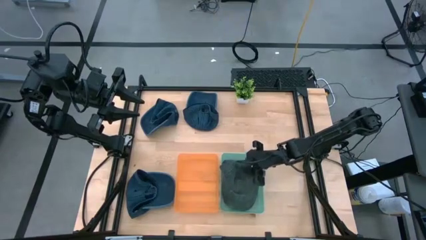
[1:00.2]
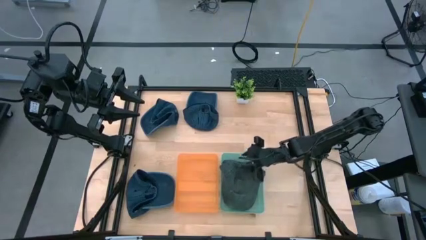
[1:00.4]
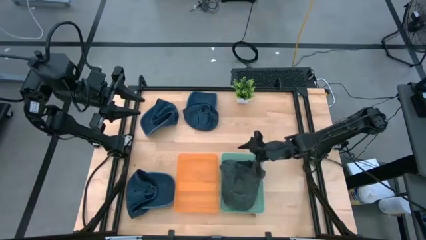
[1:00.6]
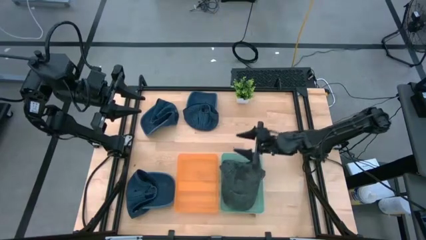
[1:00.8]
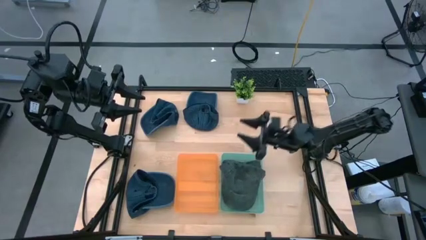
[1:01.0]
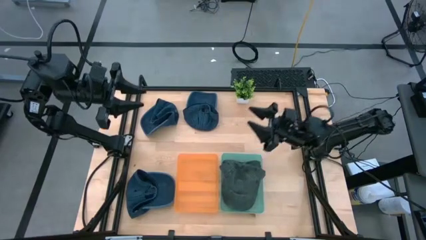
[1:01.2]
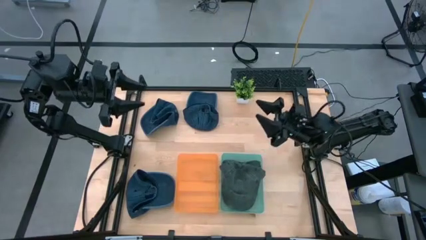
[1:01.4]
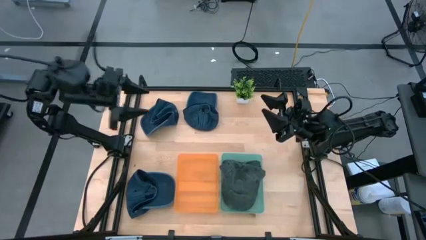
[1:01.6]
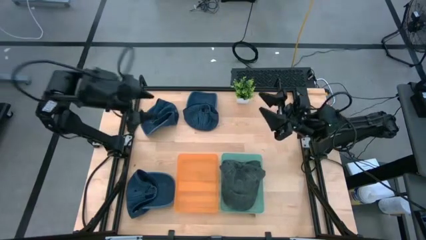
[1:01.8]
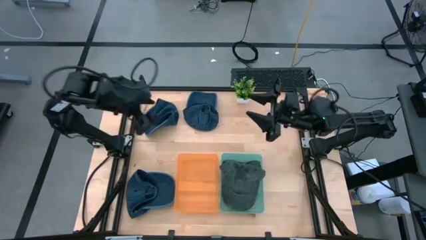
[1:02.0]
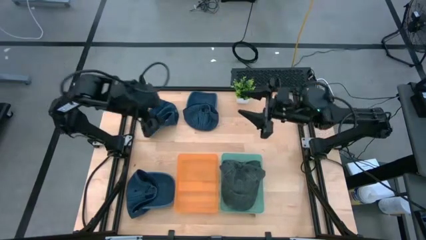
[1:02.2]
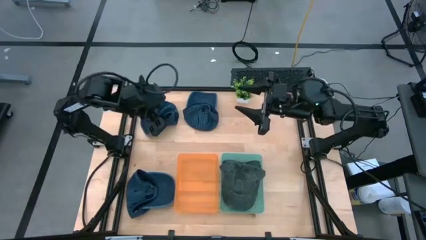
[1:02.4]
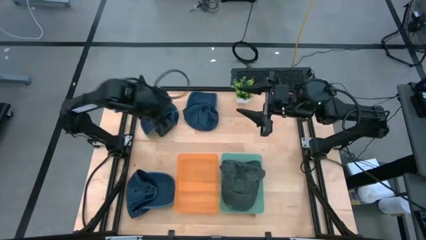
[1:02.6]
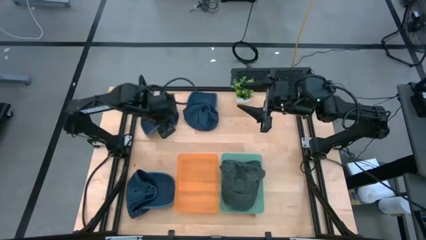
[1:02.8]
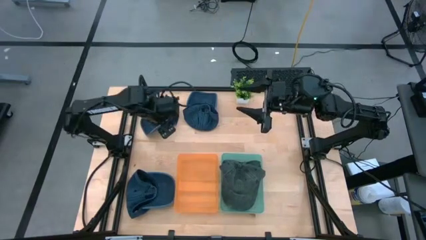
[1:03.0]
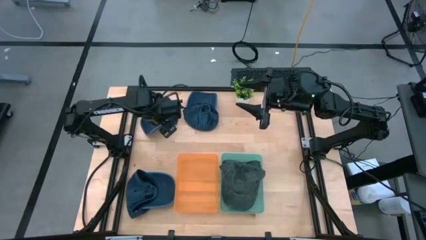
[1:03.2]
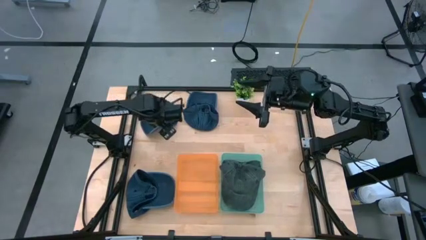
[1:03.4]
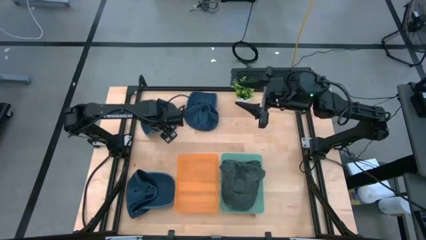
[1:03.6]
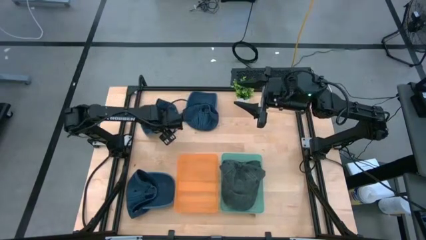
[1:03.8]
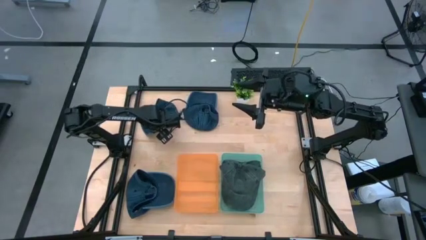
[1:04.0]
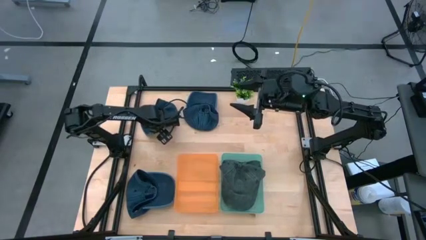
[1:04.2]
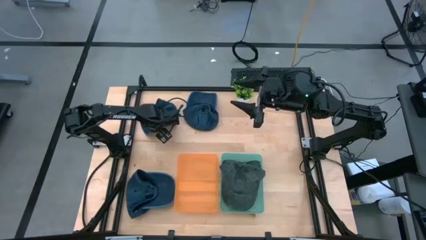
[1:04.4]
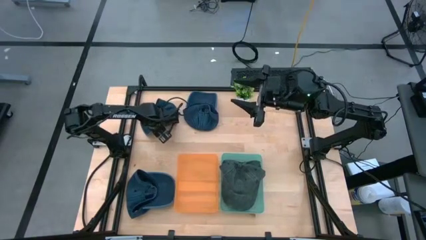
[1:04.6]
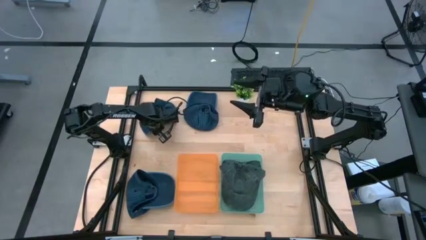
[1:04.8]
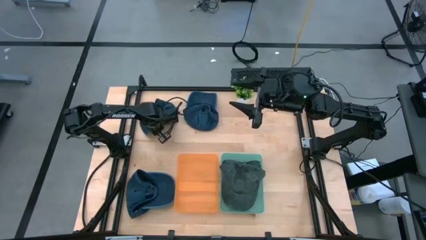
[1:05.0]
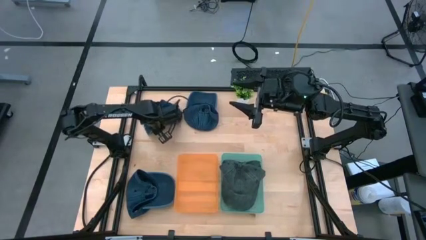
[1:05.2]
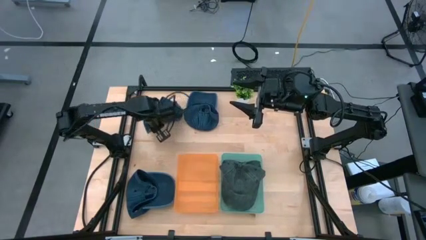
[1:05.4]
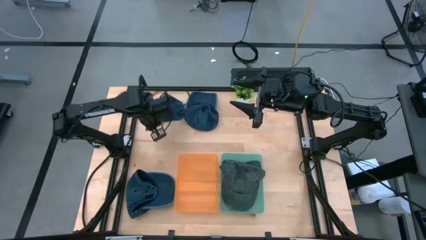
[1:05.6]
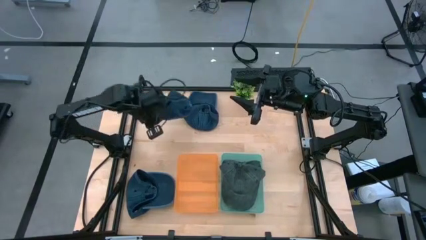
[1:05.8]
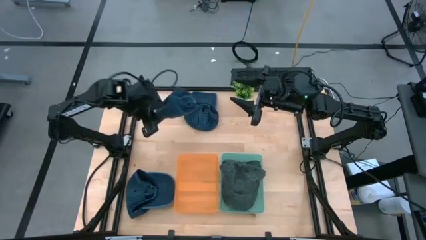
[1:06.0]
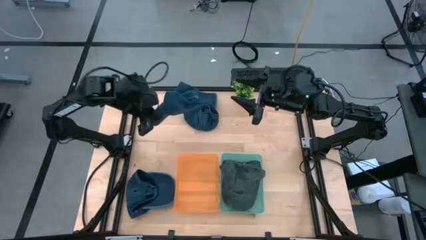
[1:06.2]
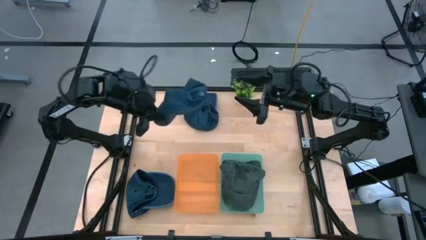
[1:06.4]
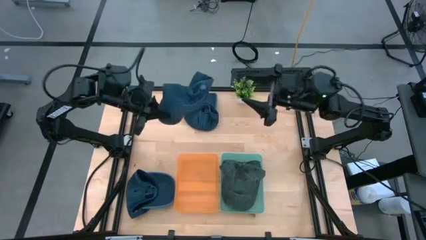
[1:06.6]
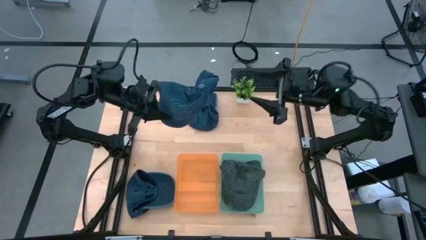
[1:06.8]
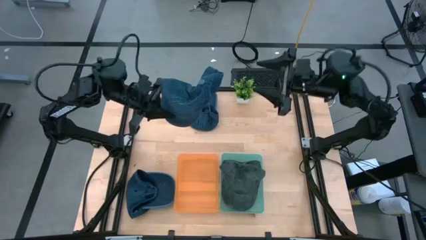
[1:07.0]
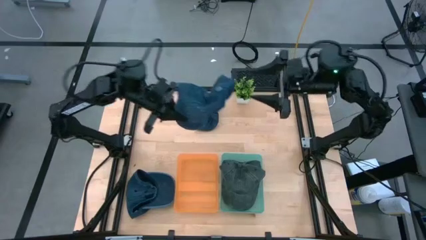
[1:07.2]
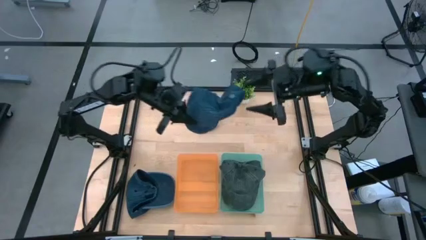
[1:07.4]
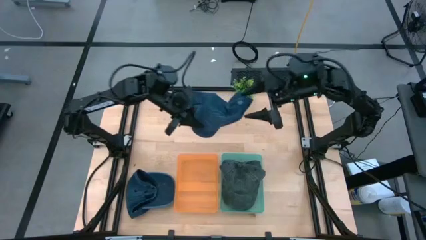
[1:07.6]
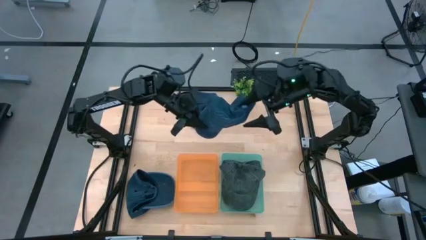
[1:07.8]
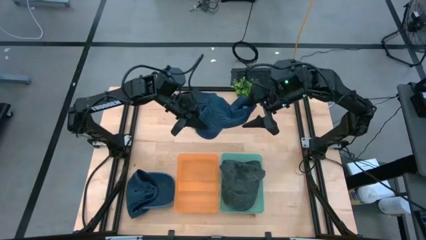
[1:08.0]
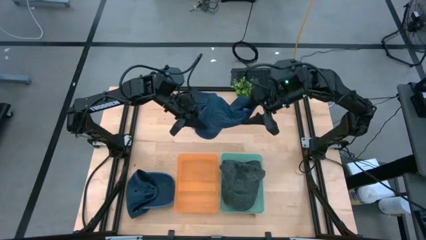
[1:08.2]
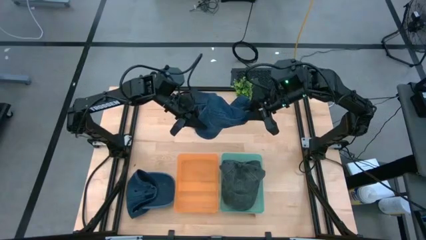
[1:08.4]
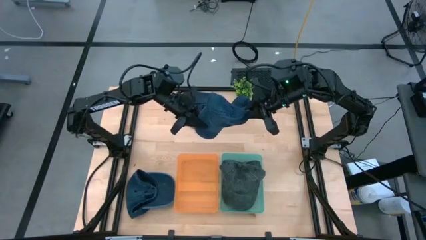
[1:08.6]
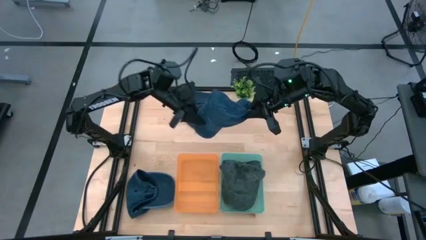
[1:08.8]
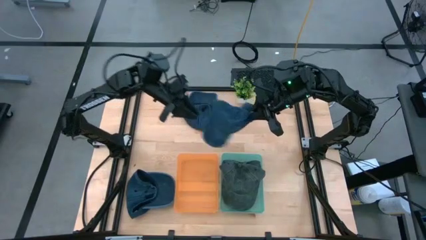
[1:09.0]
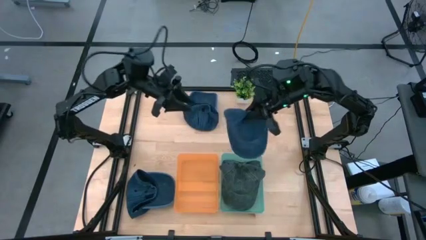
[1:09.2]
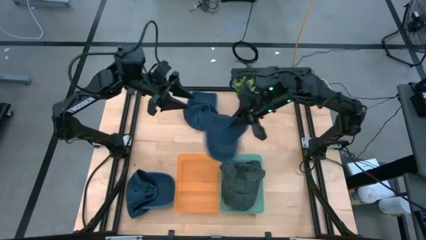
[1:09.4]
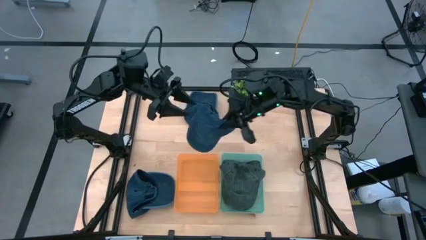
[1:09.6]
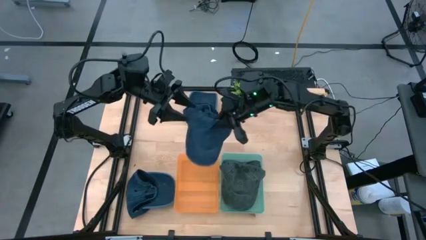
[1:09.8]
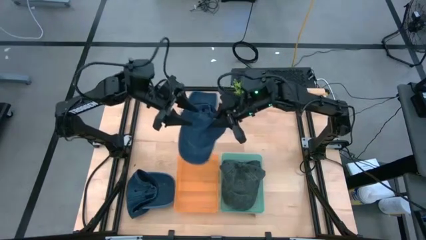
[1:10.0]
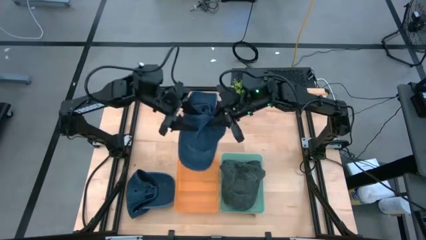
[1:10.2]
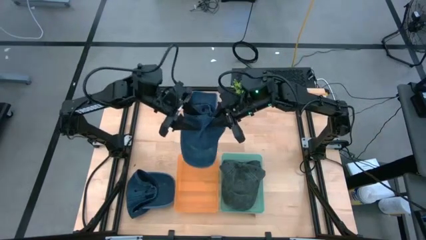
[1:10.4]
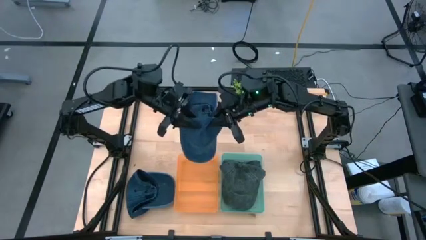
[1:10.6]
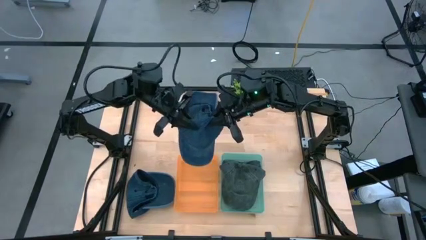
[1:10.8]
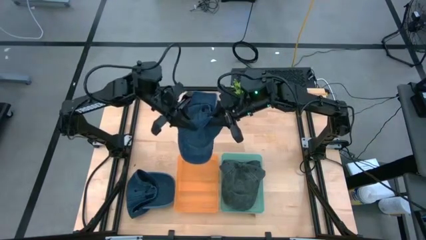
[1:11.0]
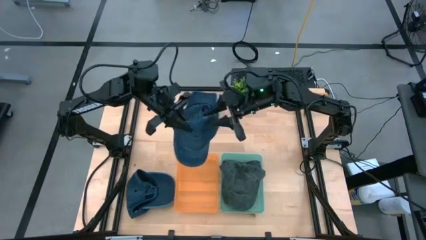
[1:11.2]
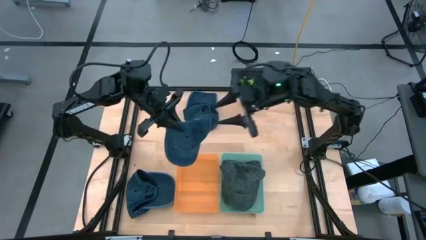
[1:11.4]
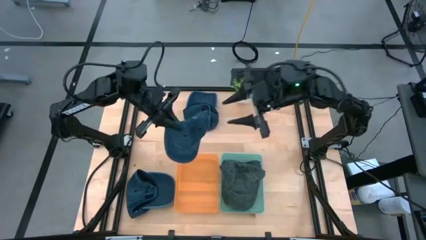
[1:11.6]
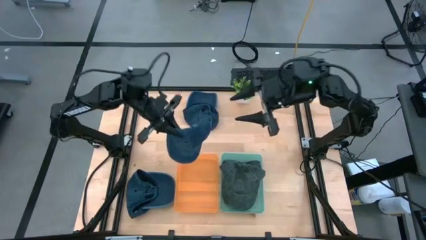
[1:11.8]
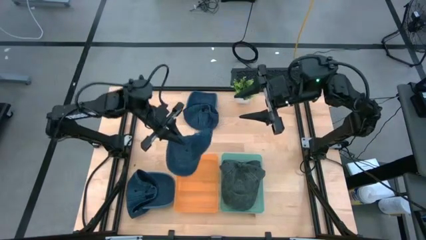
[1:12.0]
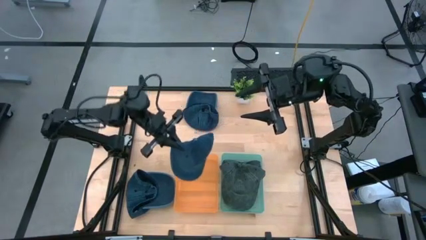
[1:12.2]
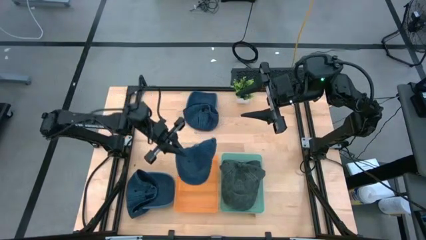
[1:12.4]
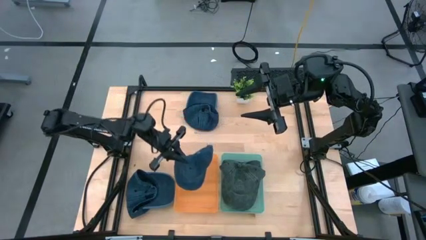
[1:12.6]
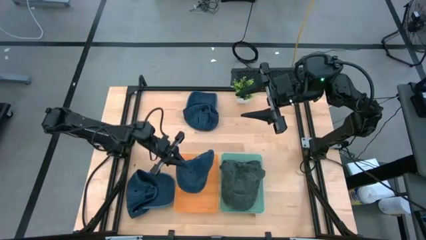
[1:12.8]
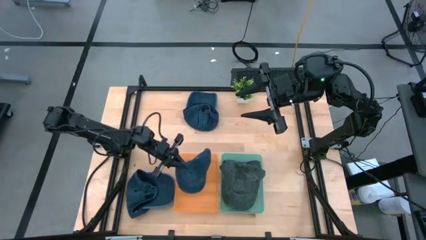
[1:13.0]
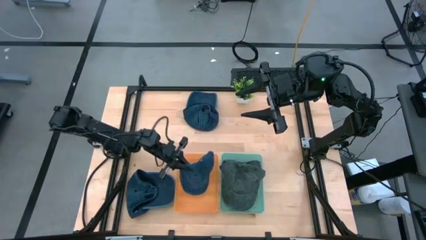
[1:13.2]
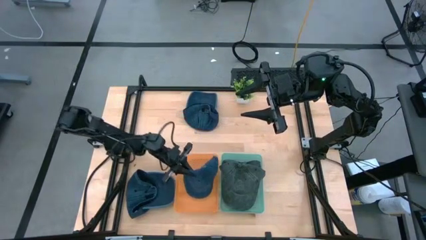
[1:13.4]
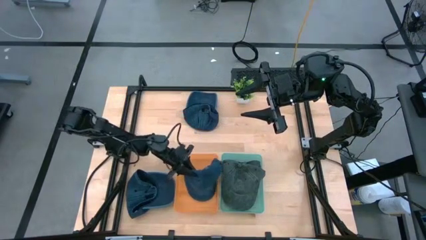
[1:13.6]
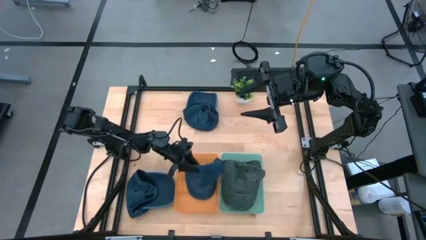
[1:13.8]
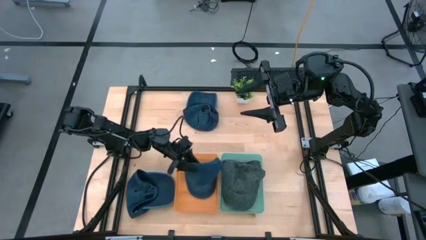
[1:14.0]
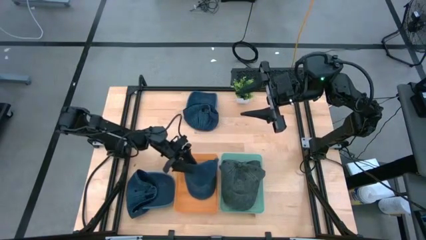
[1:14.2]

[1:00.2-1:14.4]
Task: Pick & Place hat
Put the top left blue cap into the orange bin
